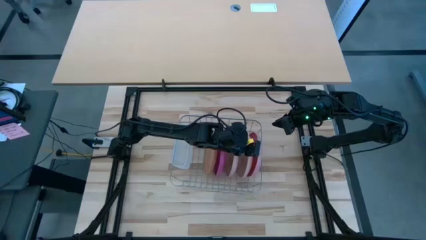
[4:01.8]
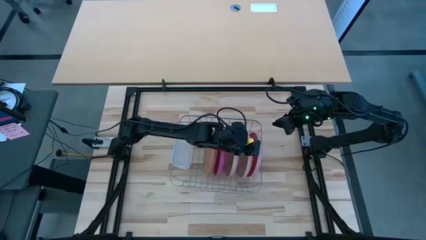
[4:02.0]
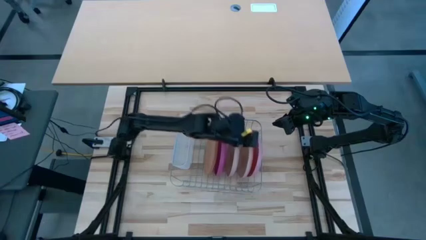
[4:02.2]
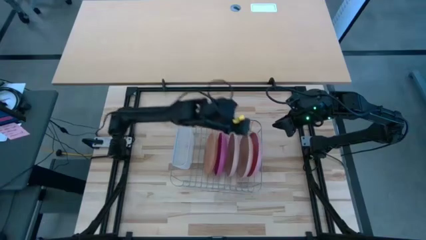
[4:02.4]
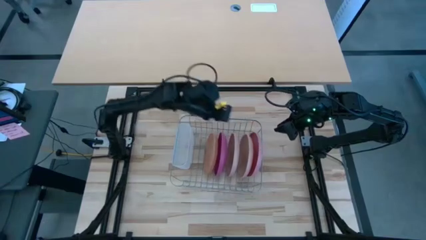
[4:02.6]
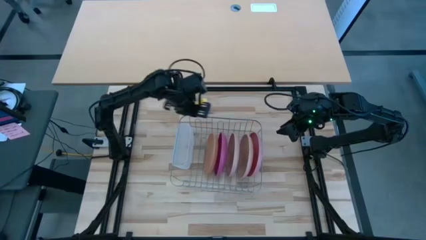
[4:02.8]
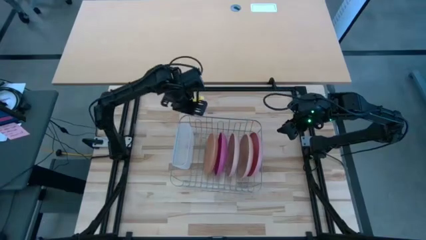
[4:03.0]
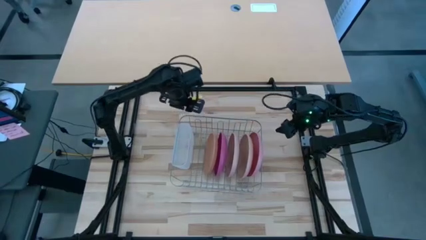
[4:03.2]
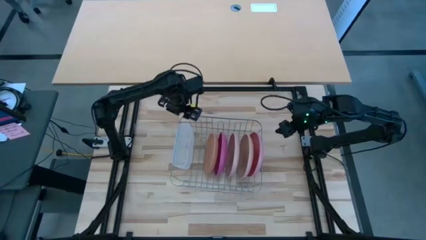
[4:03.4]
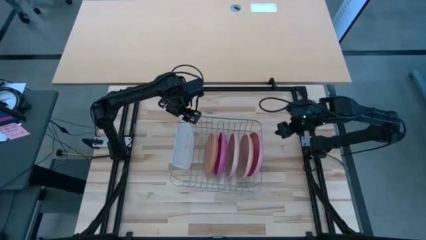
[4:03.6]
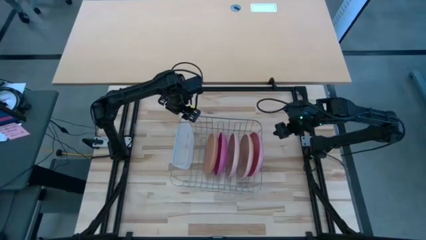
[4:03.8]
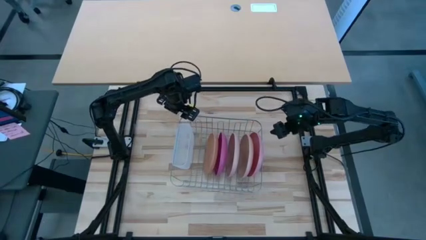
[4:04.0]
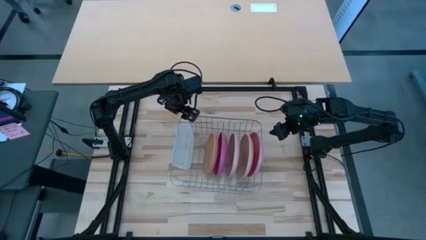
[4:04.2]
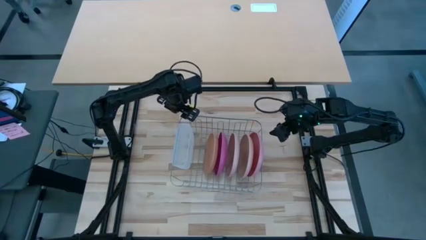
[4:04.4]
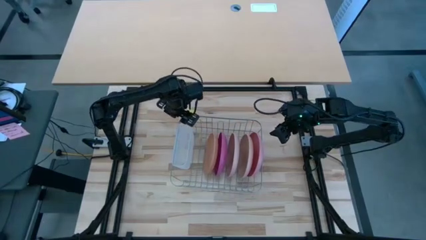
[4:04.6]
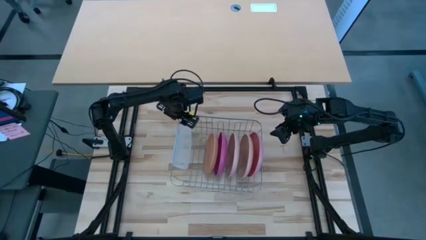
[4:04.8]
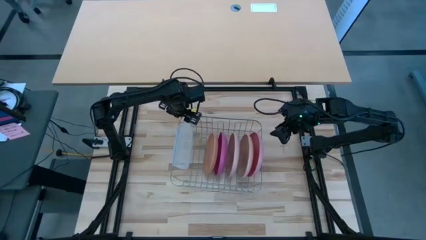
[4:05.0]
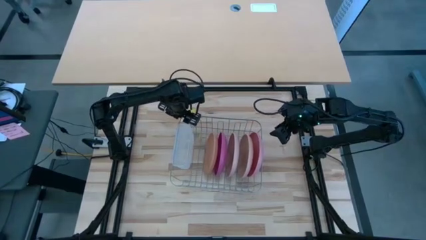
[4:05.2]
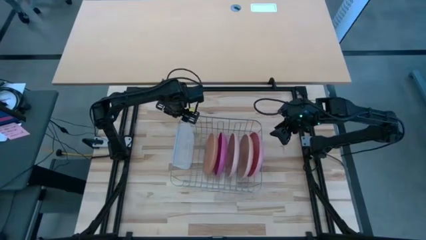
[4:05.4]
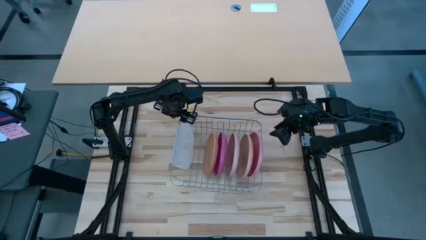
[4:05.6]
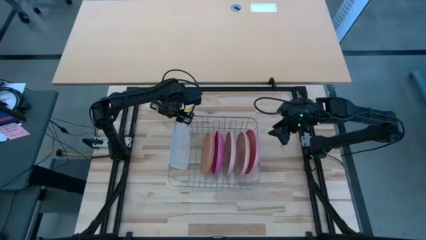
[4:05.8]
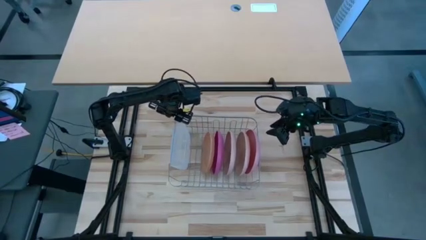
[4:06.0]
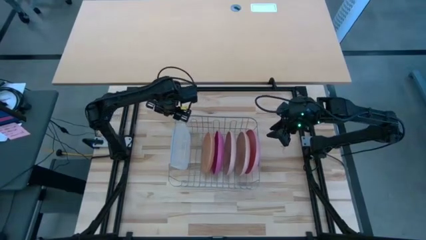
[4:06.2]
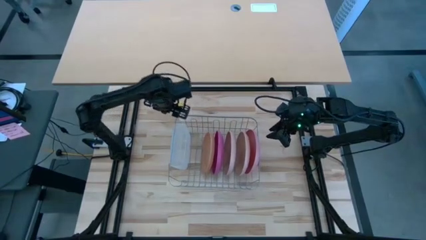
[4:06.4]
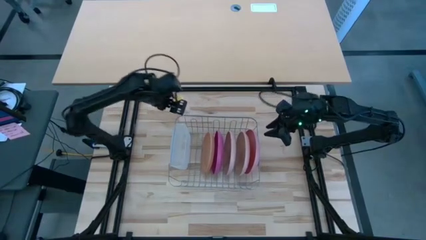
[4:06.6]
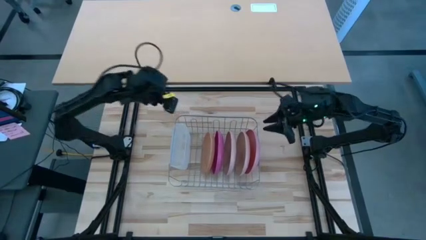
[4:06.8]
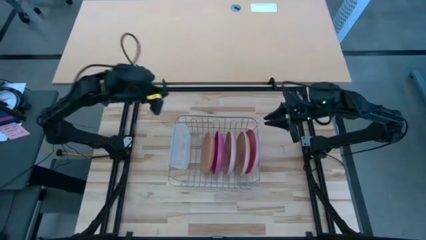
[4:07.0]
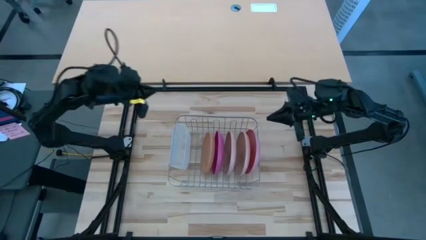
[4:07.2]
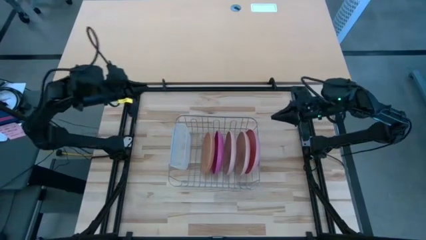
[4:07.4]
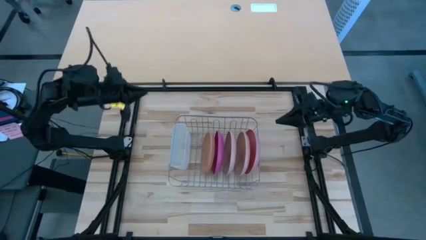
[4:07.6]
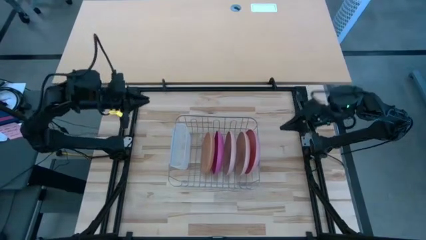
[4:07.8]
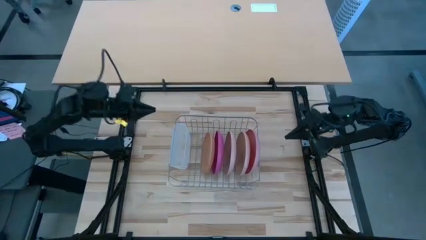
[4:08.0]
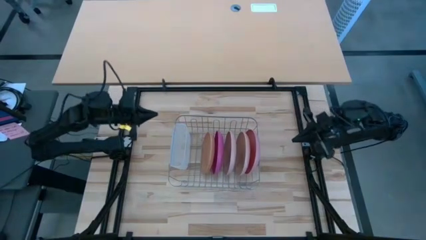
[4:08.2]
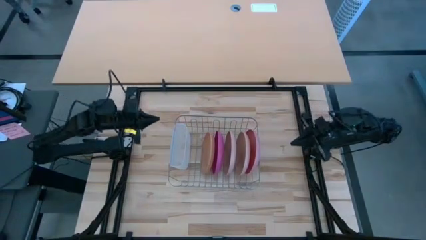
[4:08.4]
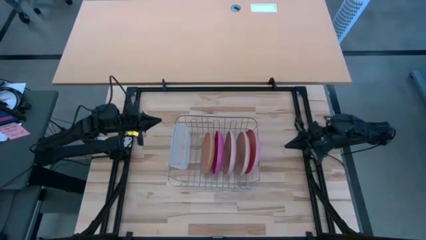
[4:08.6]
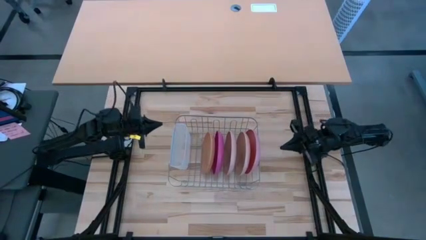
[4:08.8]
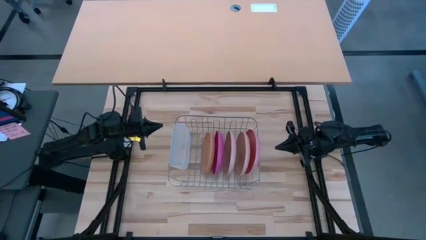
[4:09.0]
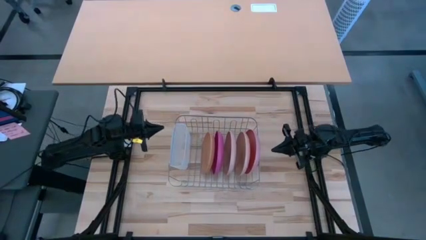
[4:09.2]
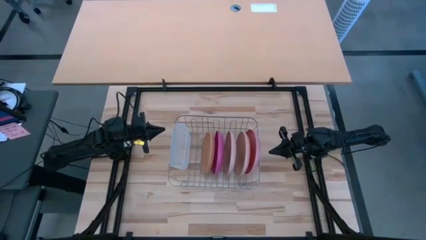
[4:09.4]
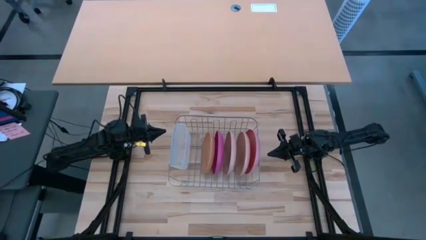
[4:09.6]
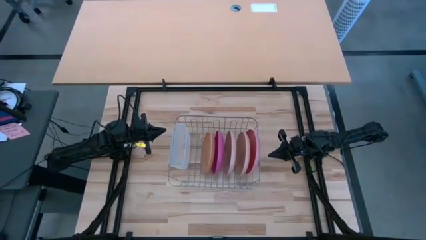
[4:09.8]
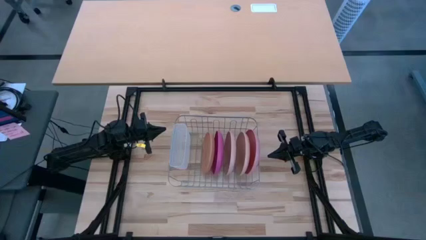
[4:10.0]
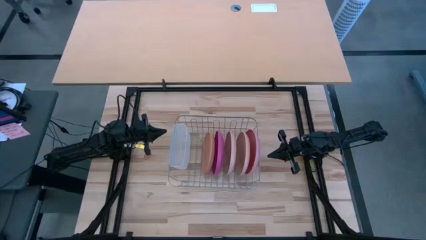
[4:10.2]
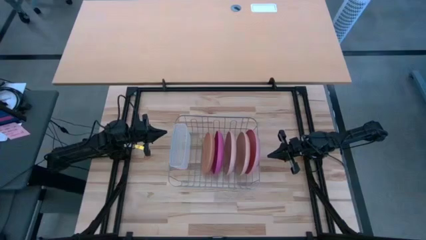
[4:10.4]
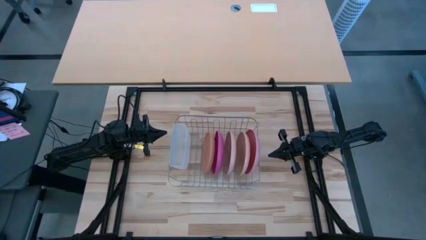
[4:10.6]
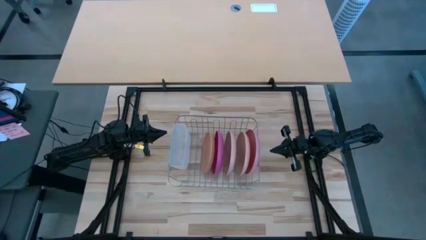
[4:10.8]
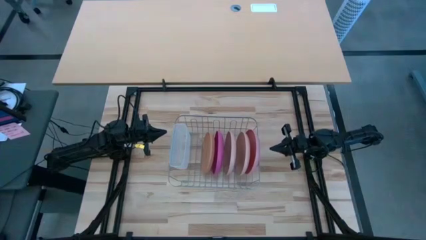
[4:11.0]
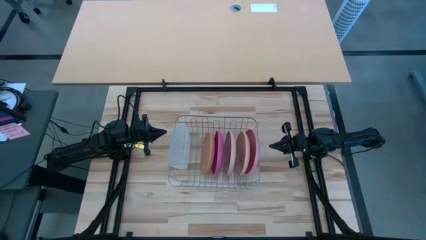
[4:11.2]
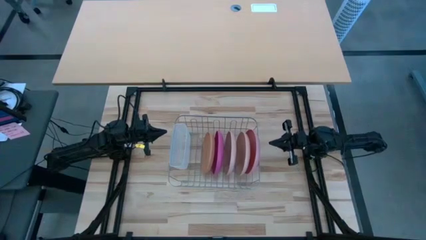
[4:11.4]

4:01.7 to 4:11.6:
Task: Sort dishes
Return to Home Position

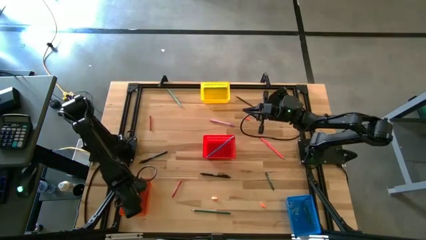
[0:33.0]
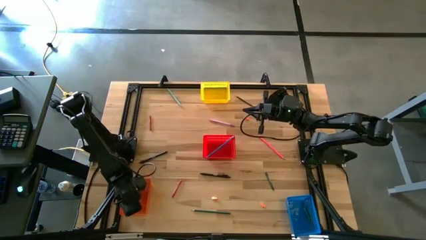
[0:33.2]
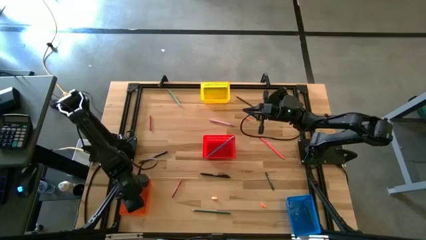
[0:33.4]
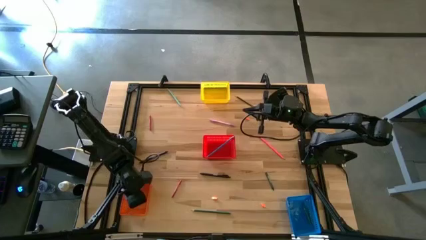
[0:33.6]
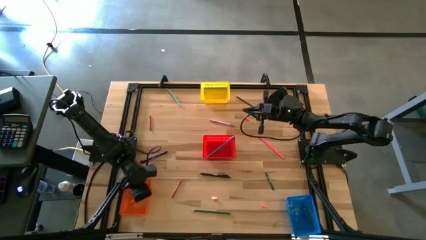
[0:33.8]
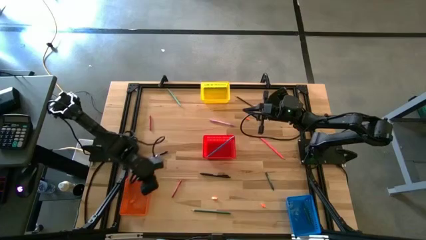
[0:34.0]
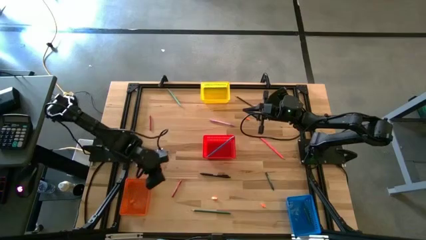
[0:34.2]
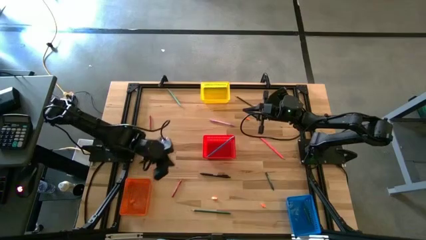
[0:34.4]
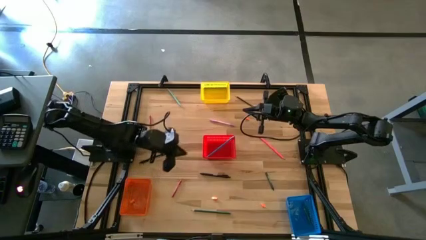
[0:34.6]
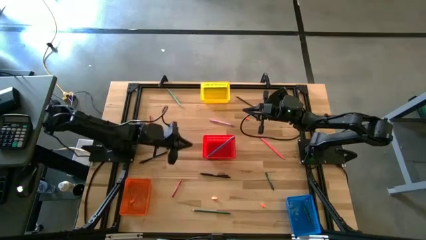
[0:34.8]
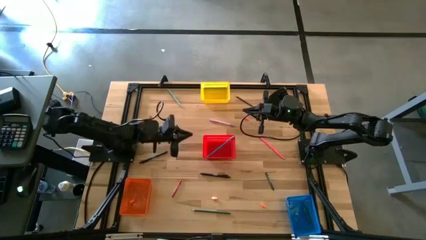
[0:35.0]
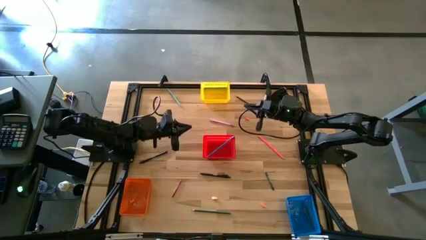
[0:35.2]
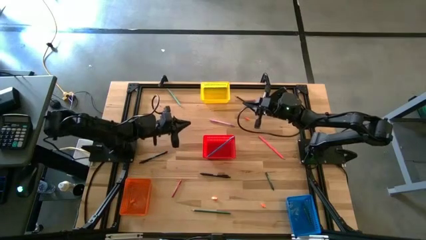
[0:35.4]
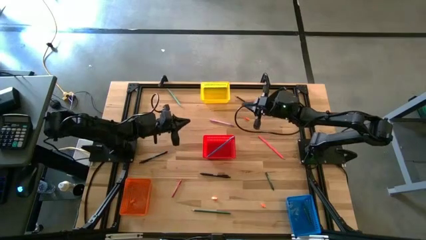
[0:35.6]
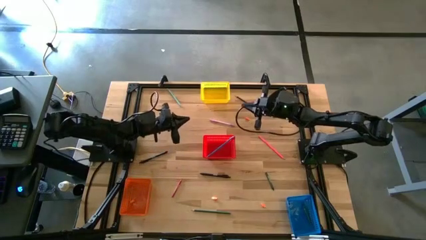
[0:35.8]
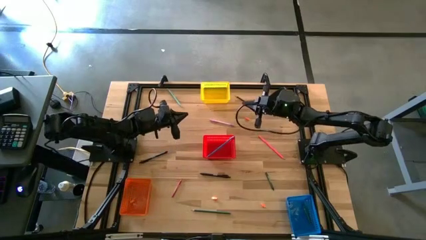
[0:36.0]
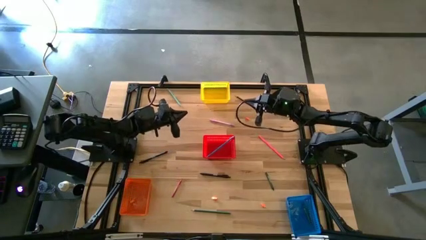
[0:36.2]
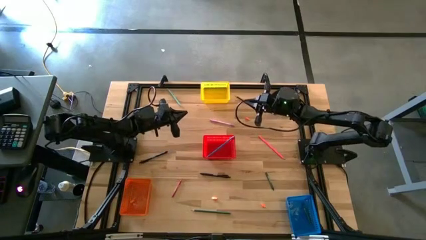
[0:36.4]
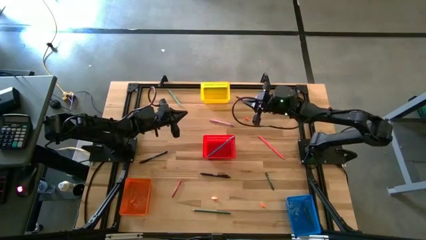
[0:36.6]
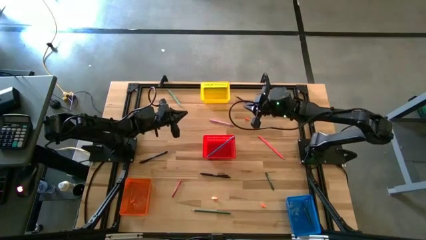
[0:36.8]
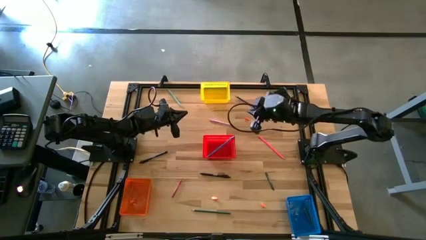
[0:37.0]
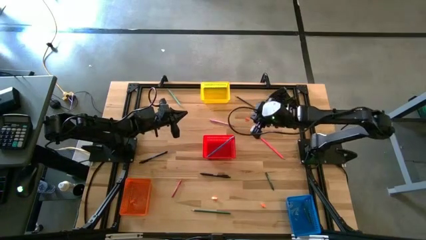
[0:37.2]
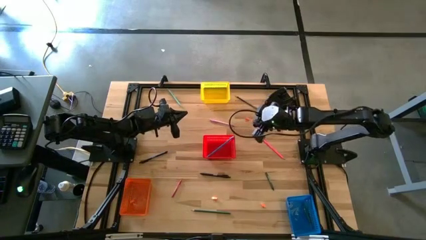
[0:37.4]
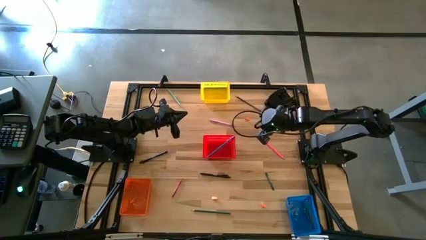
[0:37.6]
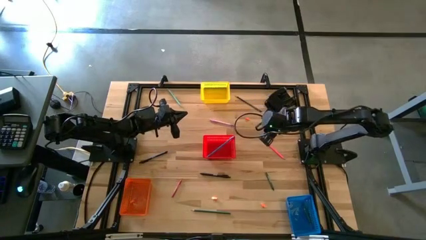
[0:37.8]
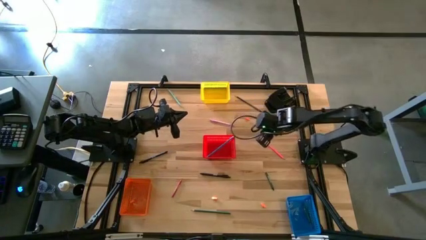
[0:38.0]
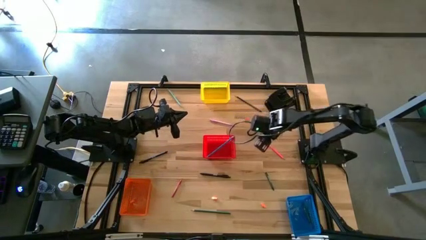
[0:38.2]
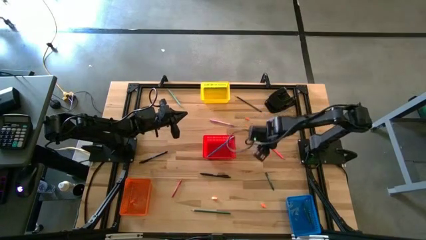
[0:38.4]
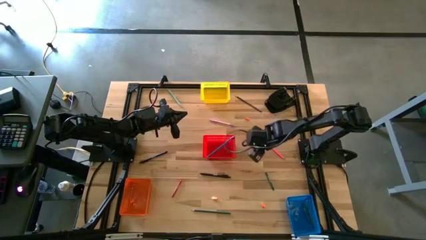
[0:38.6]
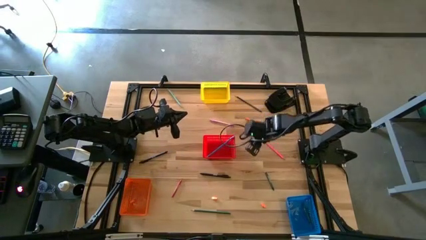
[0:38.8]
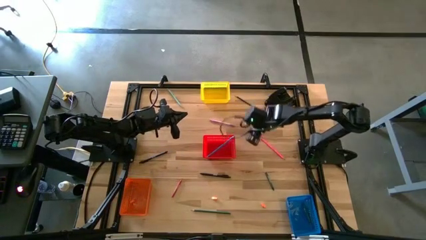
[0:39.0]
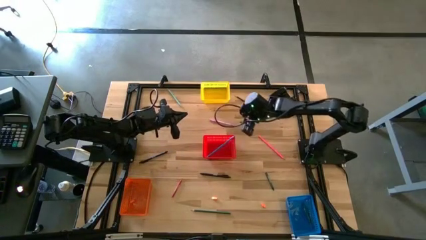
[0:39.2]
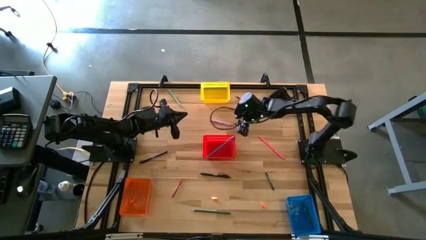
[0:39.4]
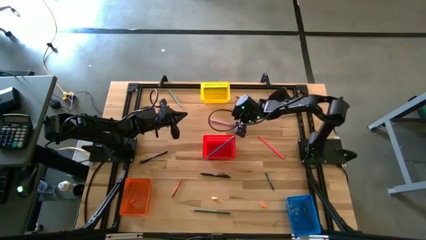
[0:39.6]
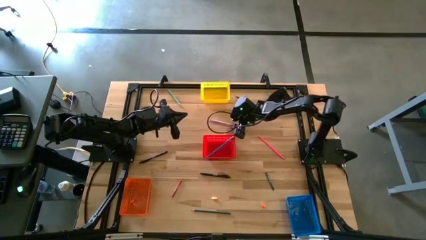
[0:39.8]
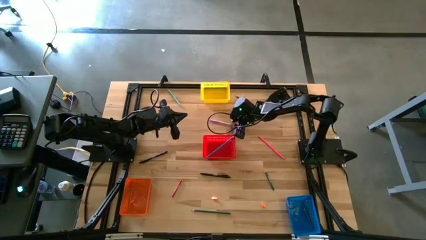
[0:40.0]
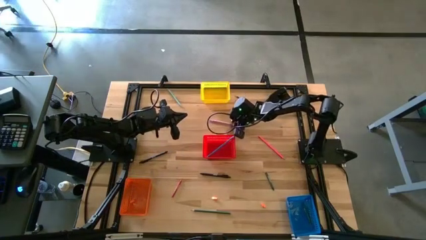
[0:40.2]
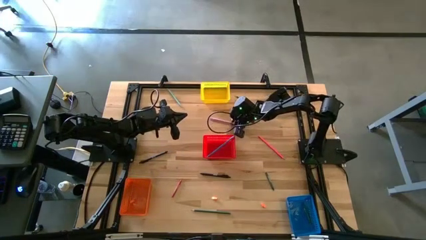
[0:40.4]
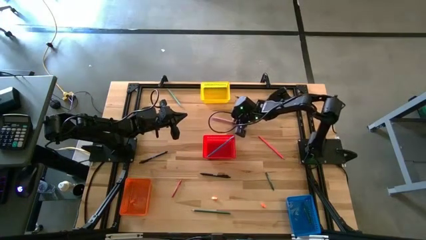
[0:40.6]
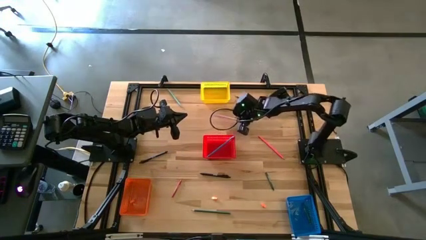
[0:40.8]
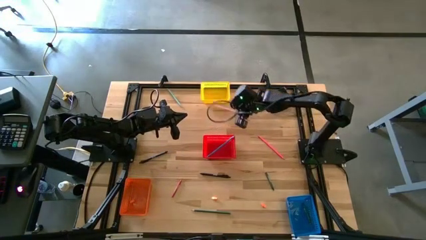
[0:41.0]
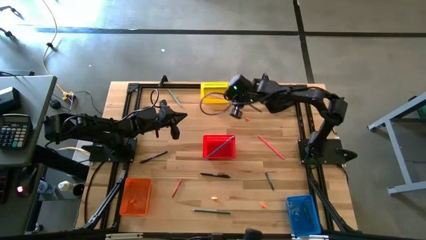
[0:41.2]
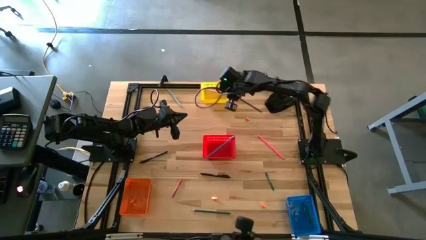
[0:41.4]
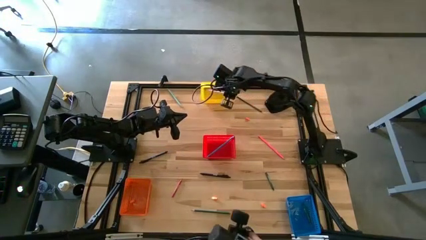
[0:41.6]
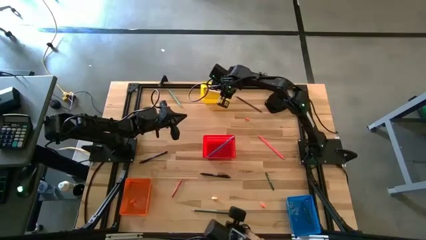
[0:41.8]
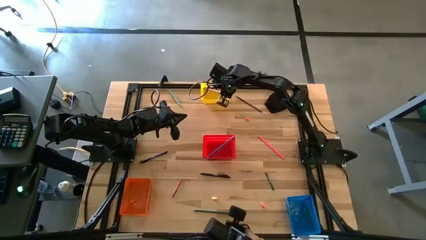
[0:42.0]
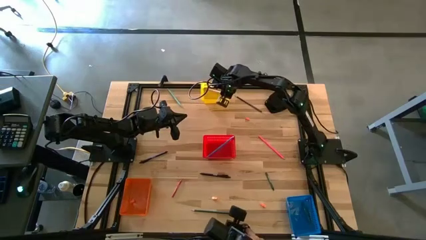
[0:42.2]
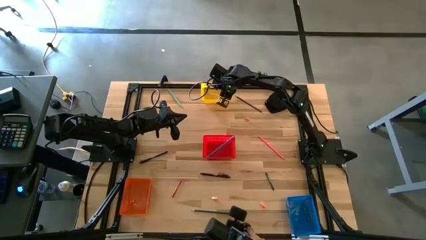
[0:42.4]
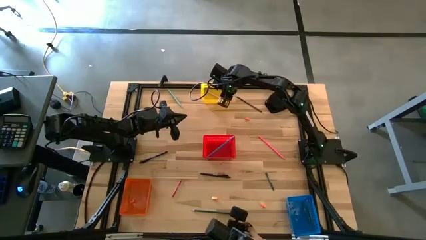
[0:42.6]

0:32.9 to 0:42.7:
Task: Sort crayons/erasers/pens/pencils in bins
Put the purple ball pen into the yellow bin
